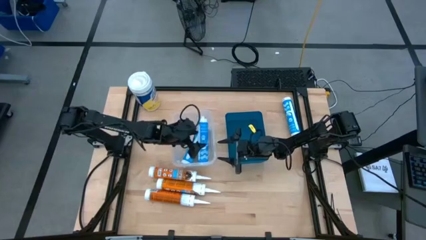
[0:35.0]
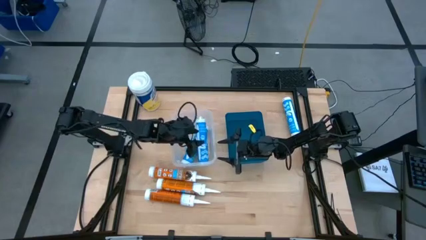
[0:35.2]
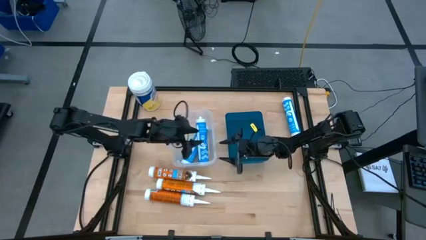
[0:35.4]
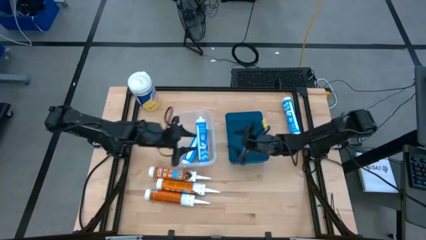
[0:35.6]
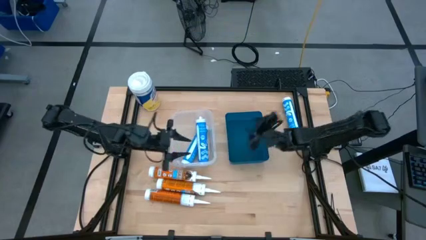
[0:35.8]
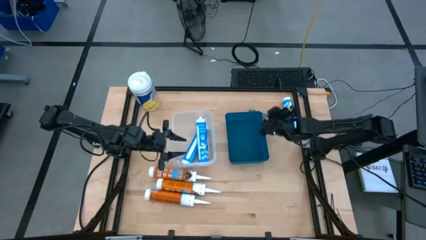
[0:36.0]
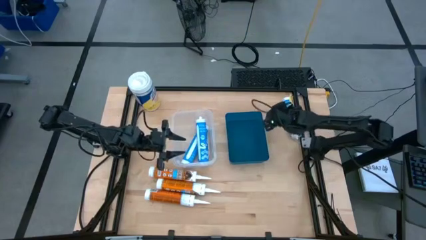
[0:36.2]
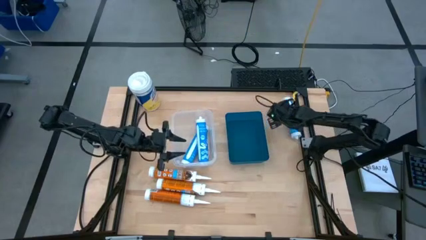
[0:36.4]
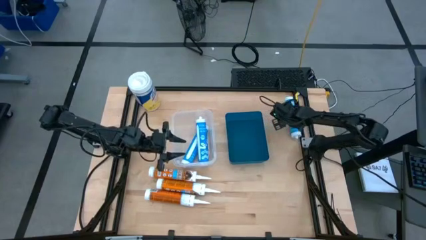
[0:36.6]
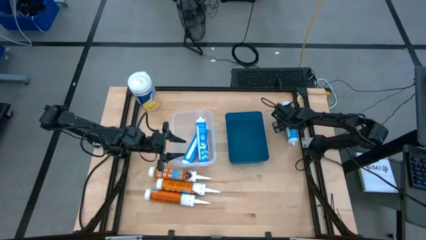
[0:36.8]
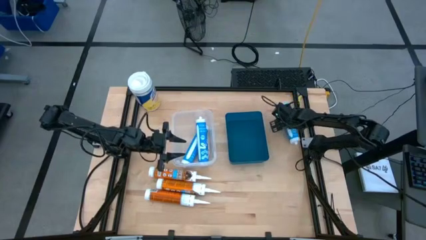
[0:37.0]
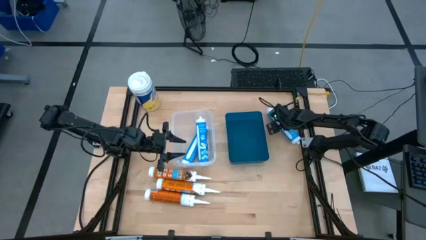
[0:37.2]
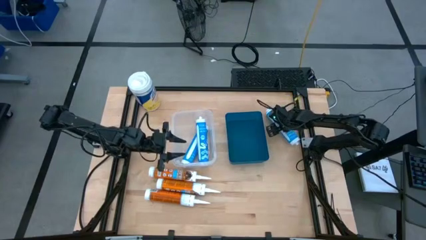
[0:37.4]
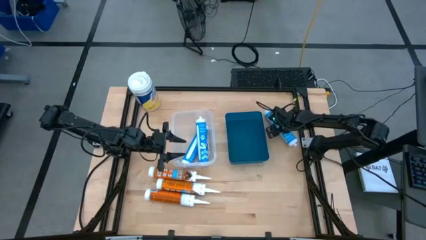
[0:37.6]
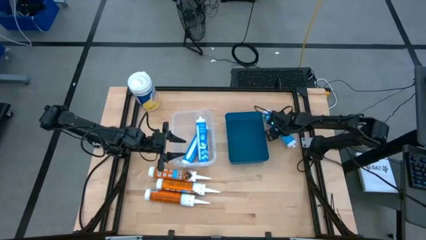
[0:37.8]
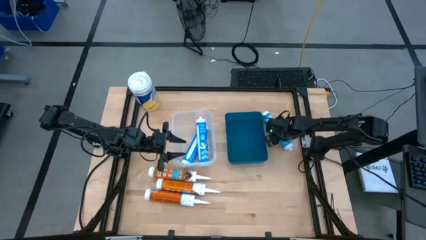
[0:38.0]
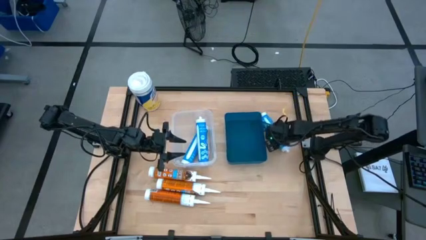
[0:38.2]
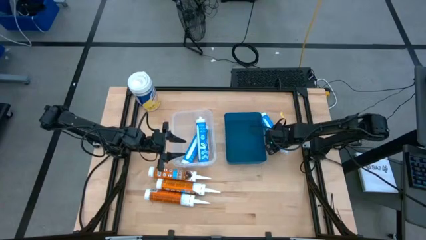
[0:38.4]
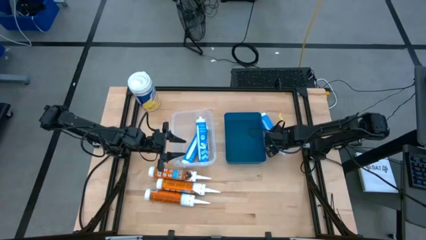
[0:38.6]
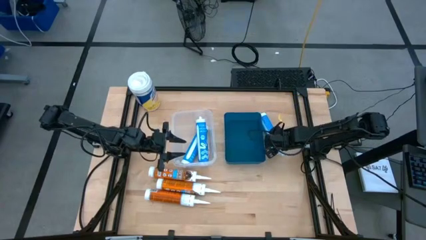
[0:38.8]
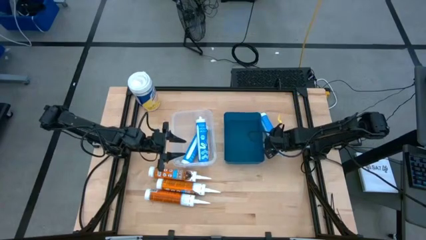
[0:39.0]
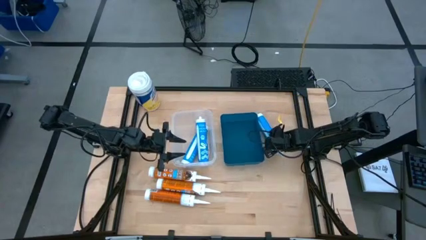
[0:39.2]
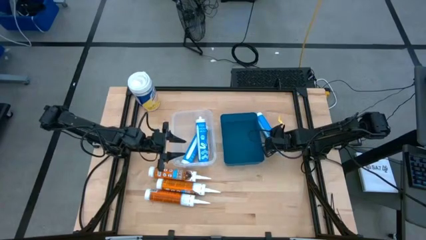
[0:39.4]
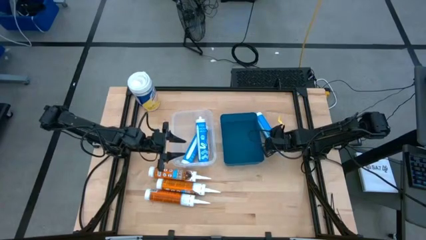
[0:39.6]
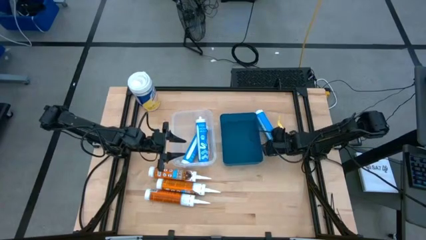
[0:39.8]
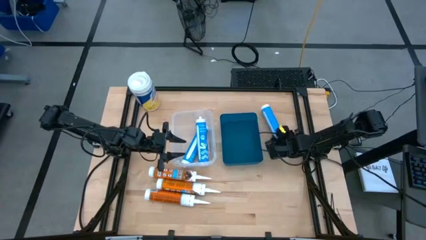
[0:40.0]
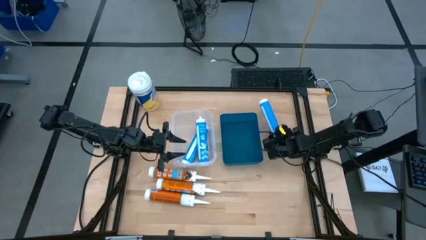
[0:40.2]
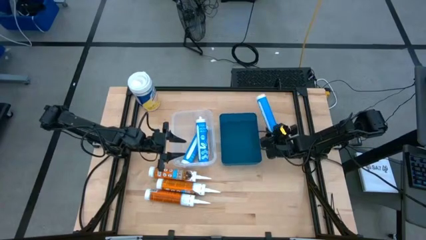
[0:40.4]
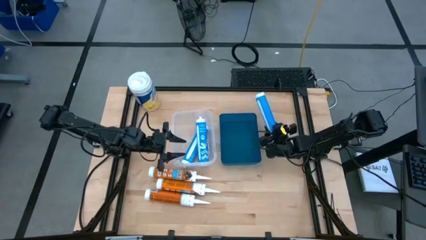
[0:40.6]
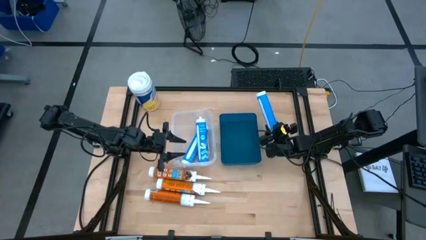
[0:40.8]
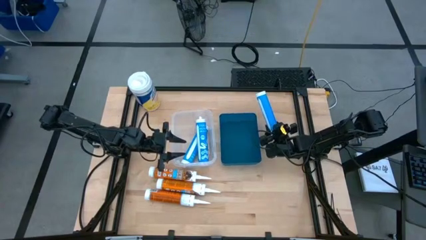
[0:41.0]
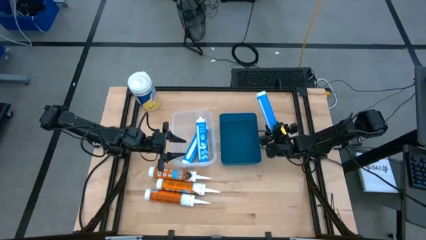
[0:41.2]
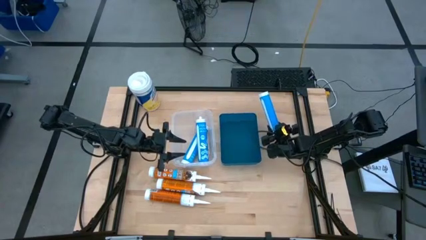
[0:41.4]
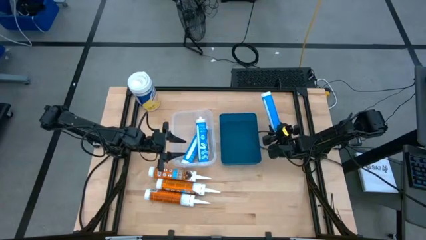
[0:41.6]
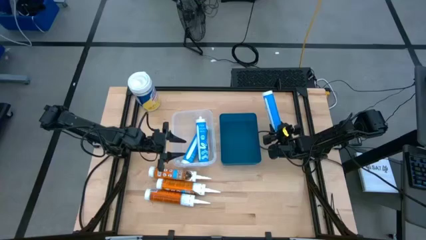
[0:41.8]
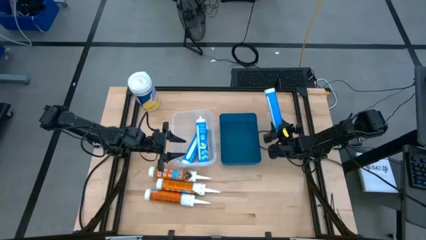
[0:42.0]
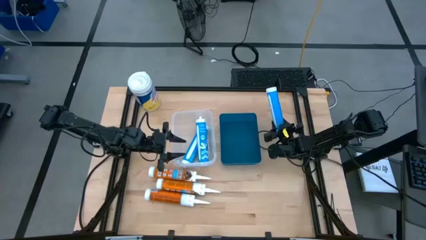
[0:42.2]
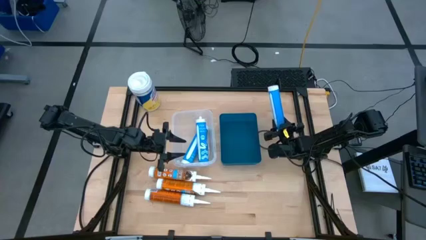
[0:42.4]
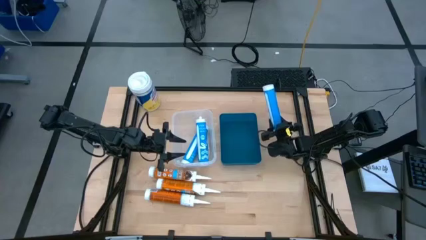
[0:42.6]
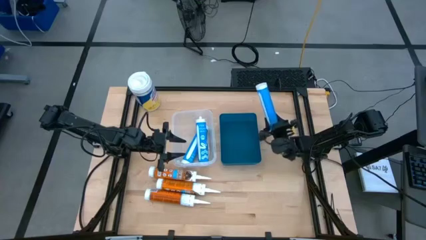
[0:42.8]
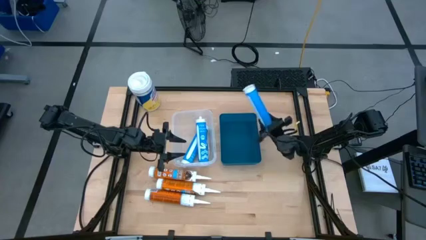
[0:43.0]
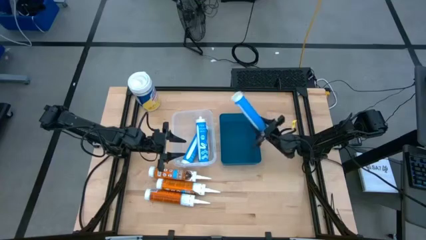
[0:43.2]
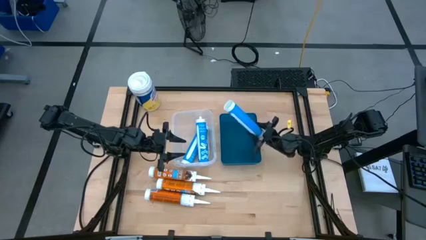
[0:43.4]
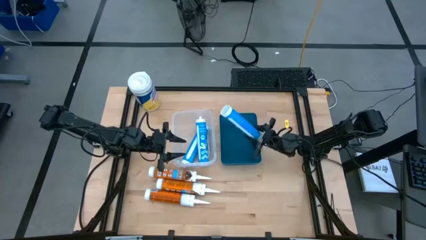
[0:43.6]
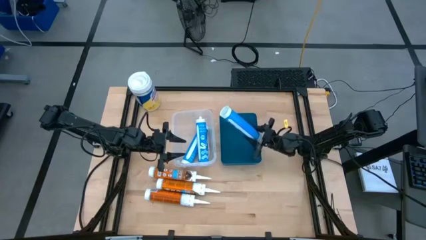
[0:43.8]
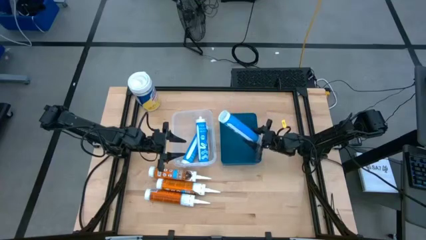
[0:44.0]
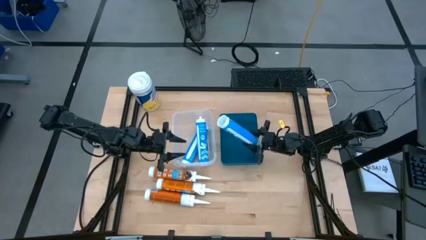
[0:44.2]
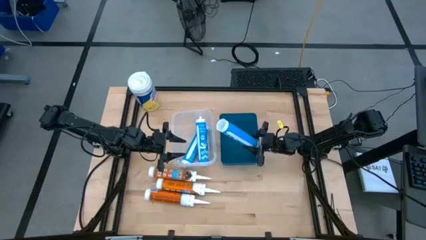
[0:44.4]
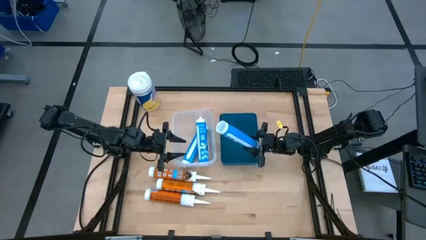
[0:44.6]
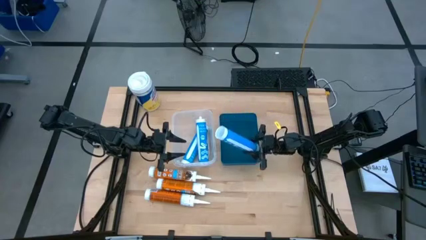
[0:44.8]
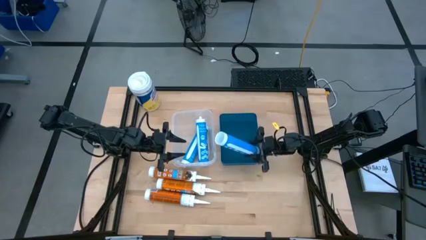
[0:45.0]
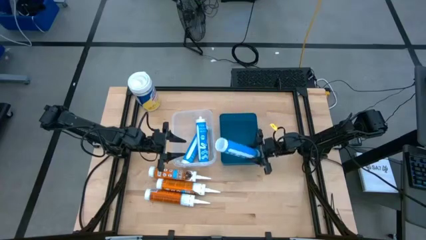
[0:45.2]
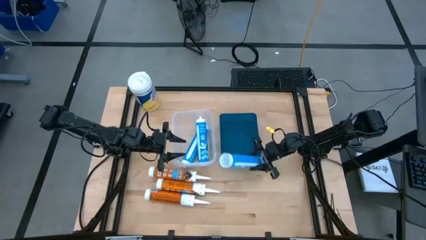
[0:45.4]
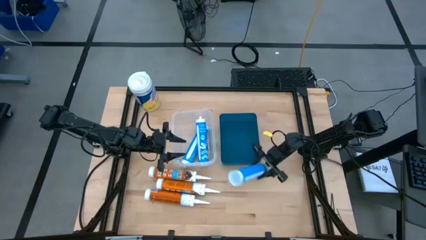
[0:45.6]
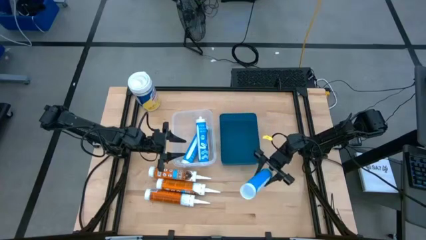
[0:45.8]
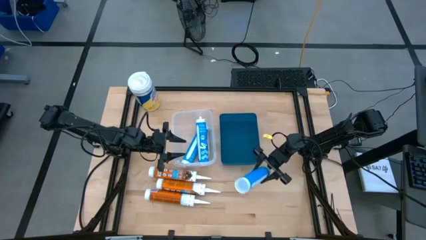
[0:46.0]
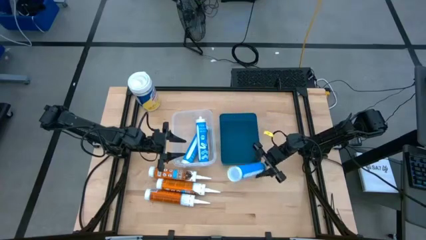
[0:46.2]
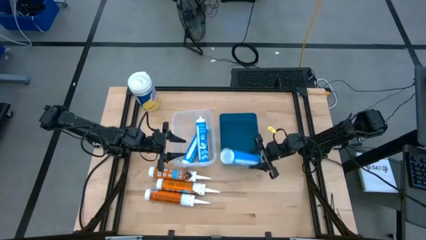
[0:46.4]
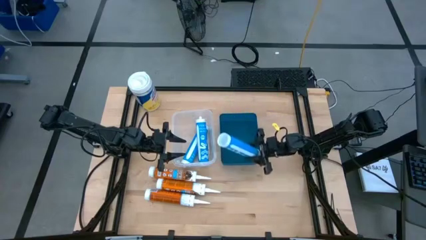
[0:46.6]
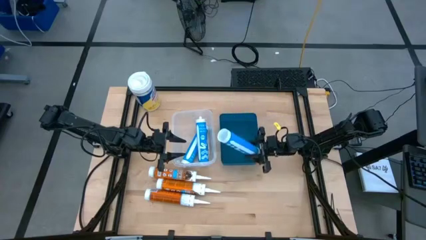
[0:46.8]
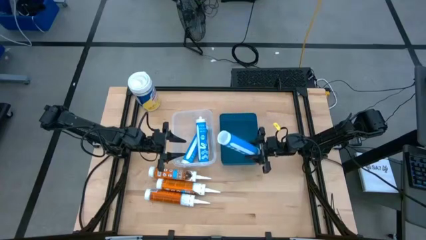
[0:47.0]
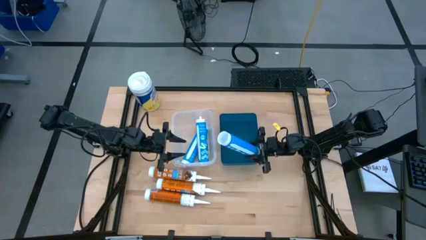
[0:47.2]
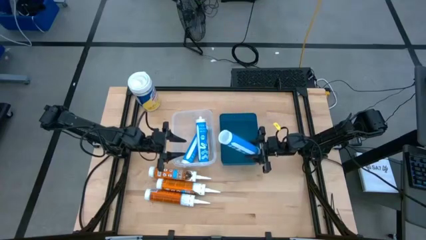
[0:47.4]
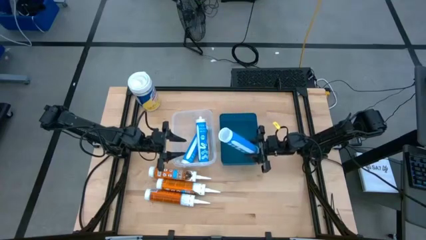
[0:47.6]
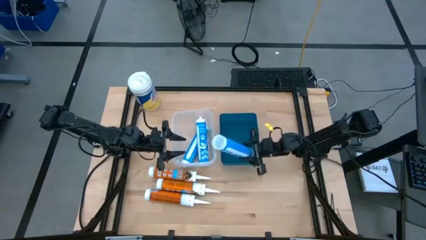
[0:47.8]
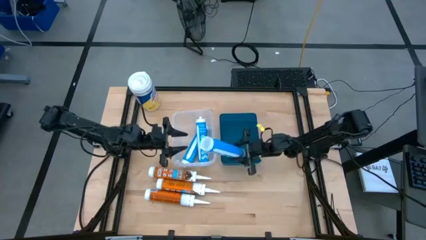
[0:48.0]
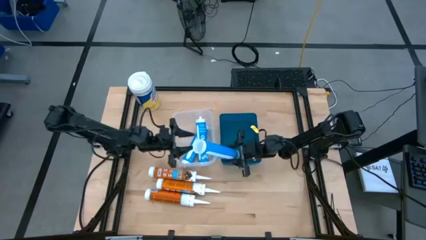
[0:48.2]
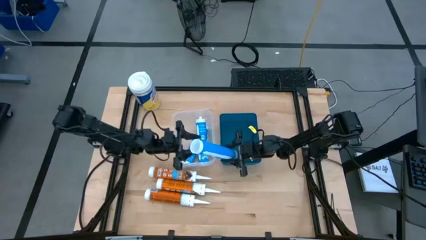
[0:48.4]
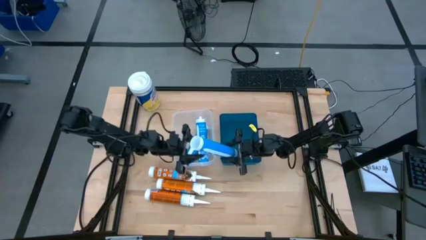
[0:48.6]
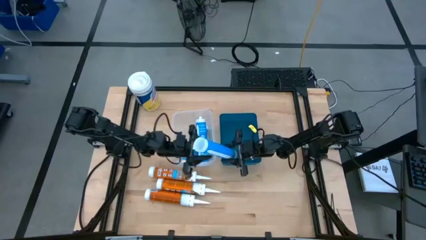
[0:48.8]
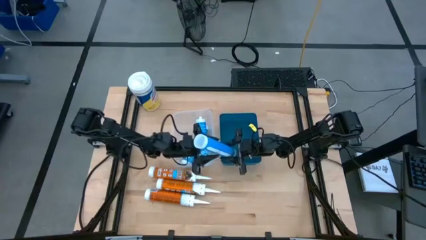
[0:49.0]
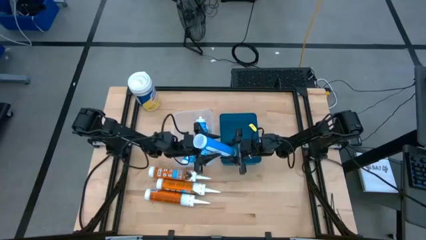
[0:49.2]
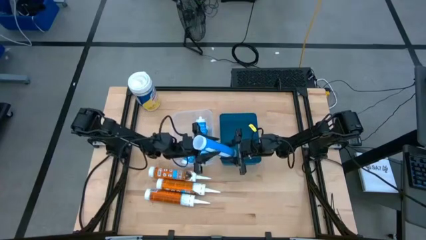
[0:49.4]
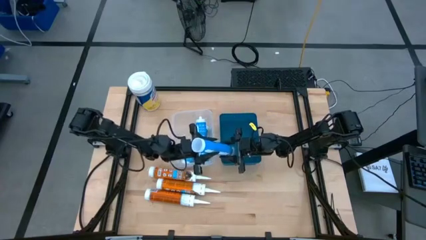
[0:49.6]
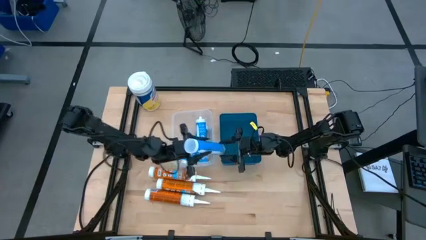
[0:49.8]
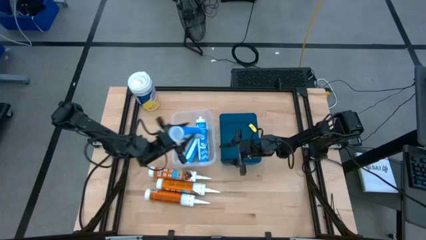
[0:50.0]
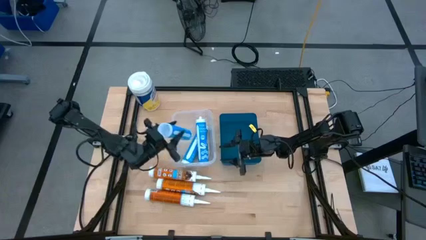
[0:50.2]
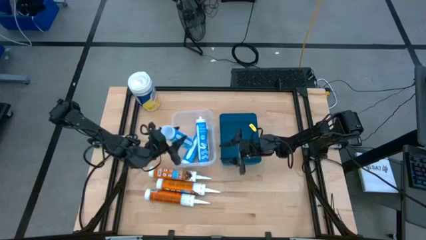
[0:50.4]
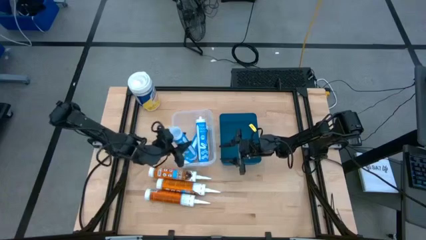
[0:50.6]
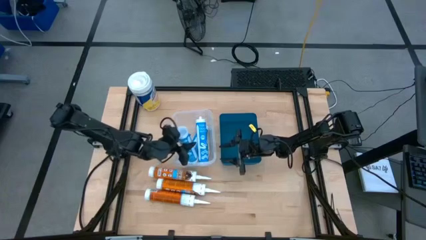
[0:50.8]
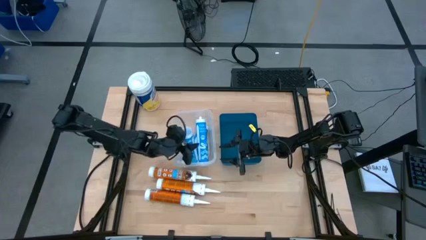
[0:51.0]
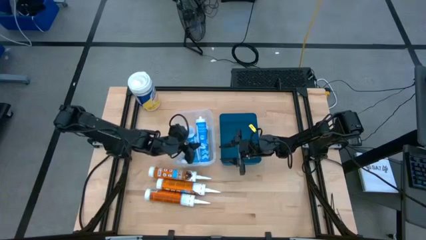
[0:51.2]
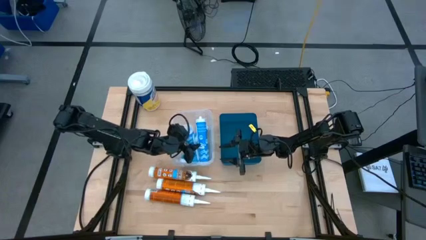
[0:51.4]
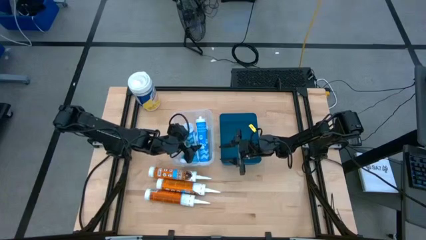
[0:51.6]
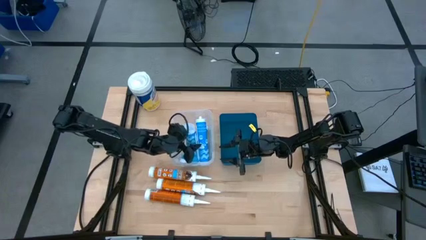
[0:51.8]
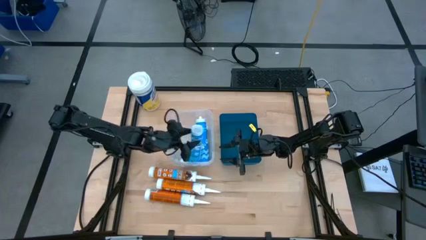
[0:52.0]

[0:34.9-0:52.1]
Task: Pick & place silicon tubes, Sealant and Lysol wipes
Put the blue sealant into the transparent bin
